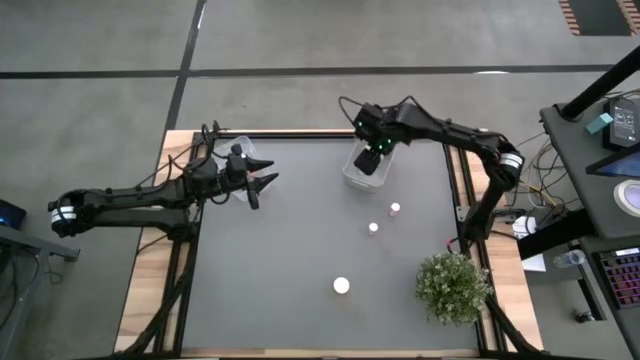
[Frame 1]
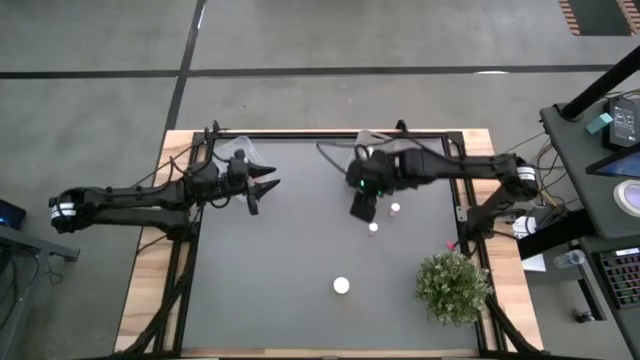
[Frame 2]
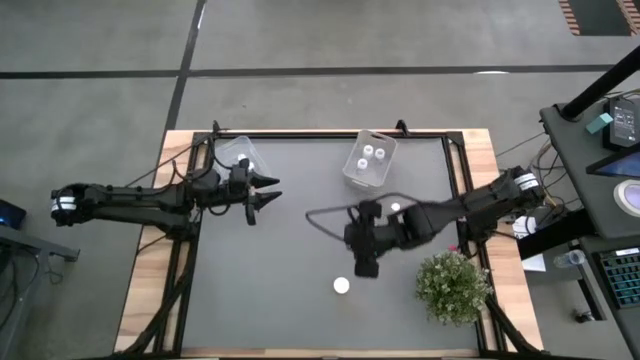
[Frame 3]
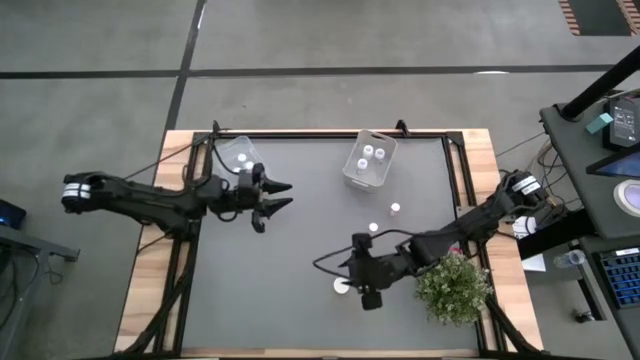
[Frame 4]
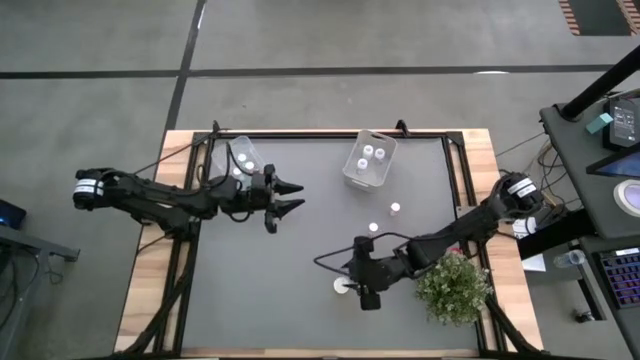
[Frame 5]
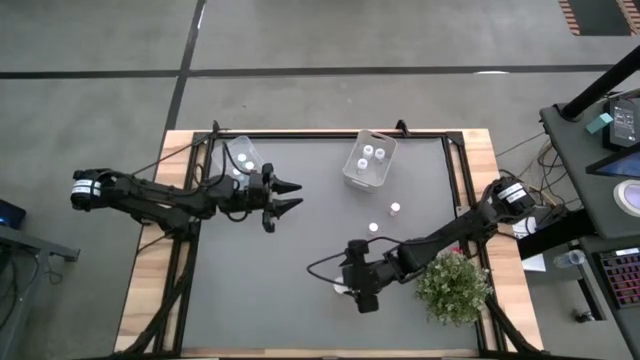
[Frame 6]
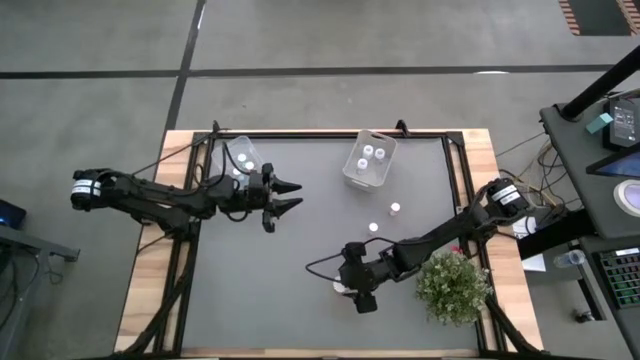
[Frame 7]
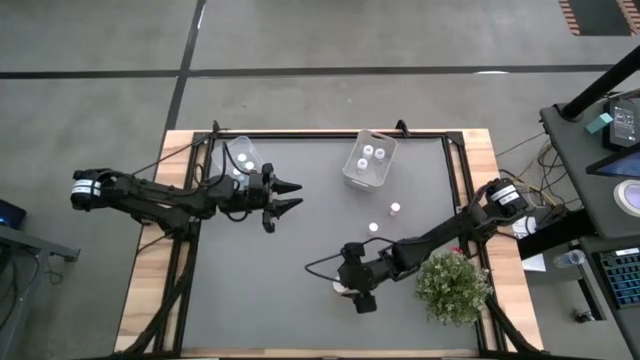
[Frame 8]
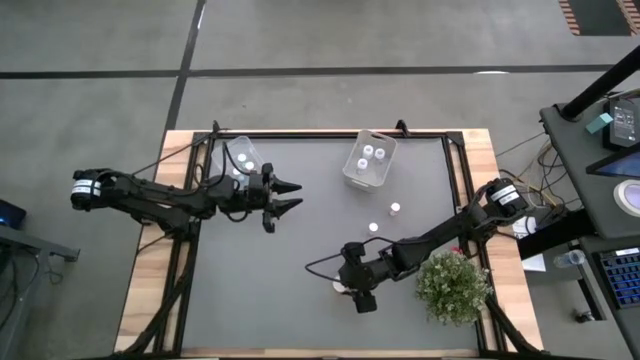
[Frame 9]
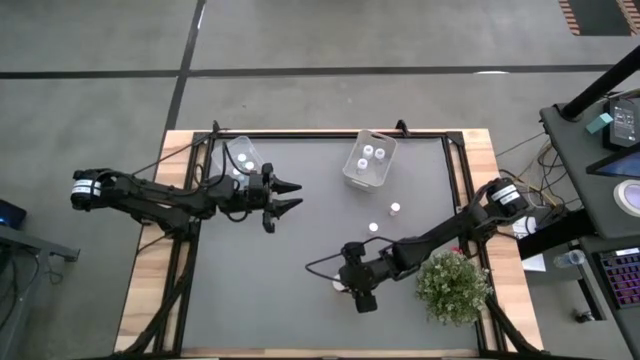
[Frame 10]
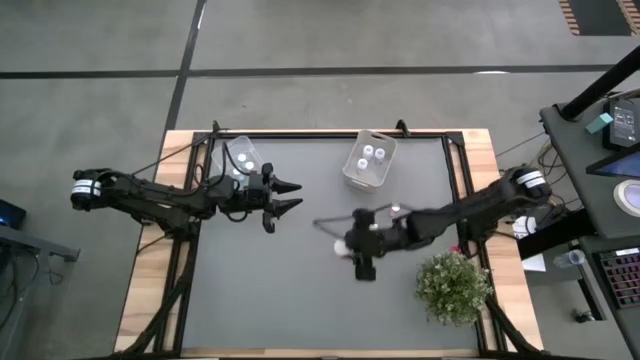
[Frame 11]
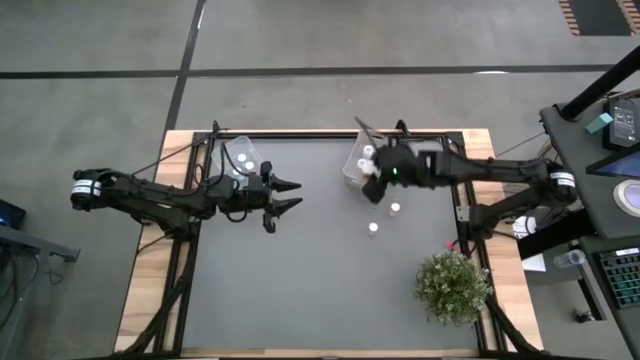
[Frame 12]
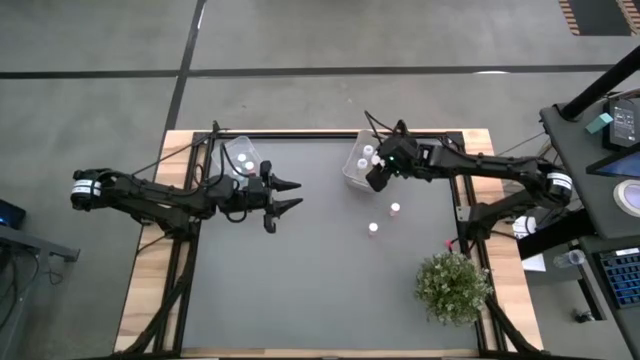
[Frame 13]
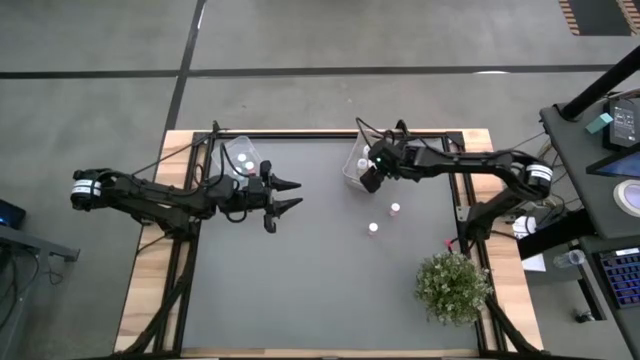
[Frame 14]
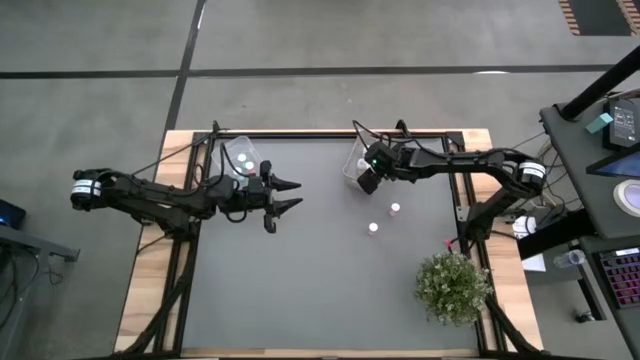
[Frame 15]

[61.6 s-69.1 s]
Task: Pick and place medicine bottles into bin by pill shape (circle, oval)
Put the large orange pill bottle into the gray bin

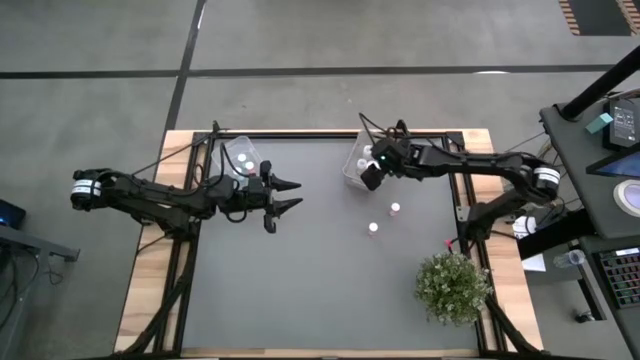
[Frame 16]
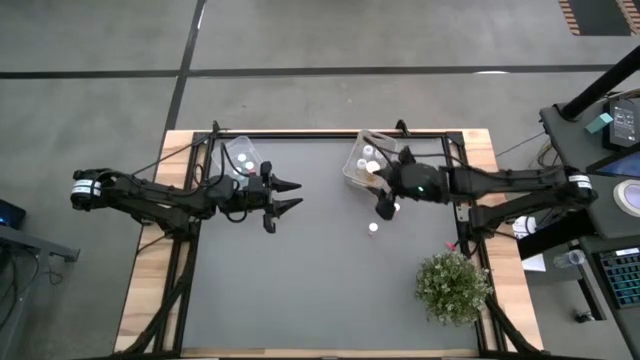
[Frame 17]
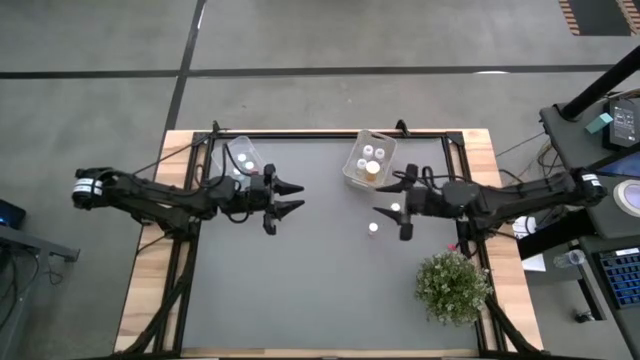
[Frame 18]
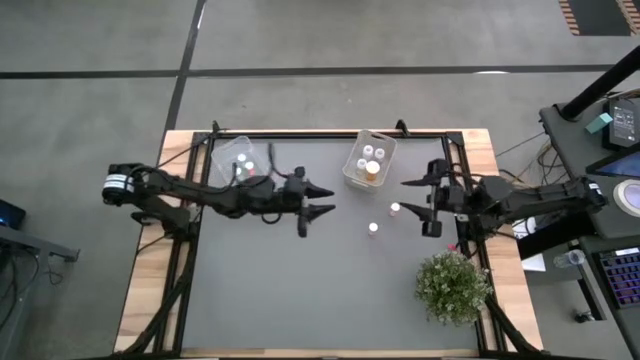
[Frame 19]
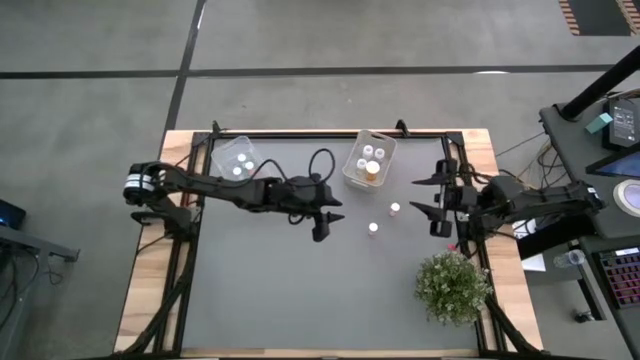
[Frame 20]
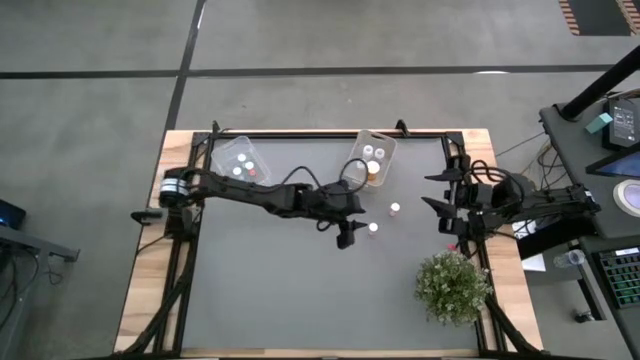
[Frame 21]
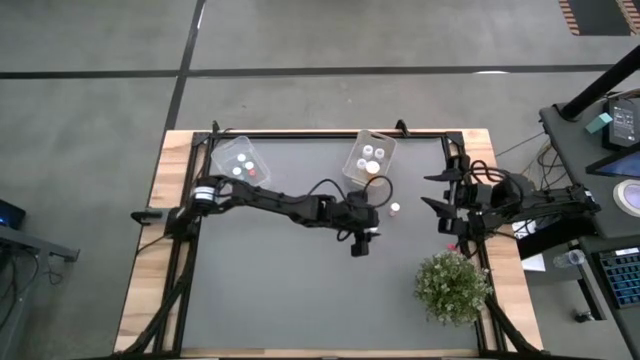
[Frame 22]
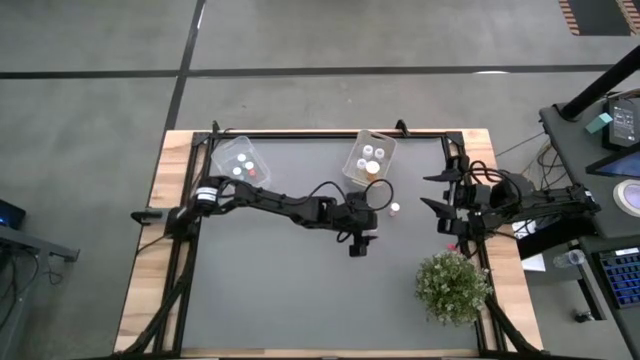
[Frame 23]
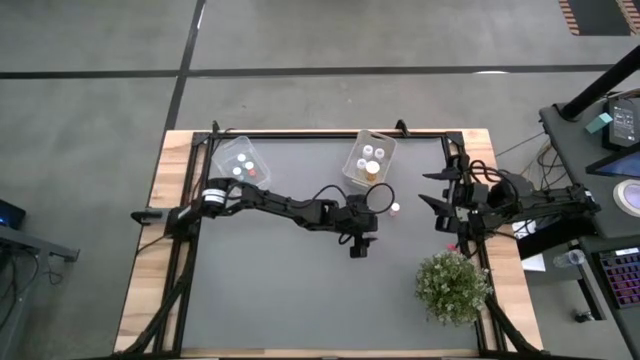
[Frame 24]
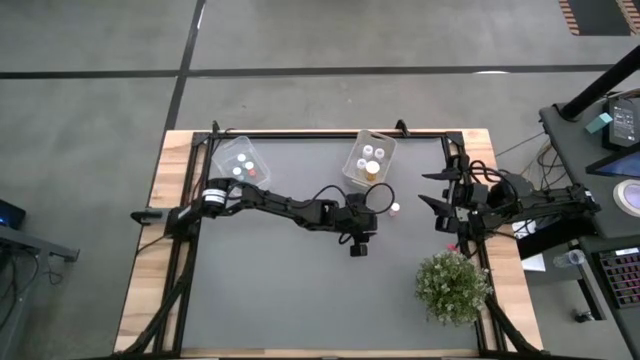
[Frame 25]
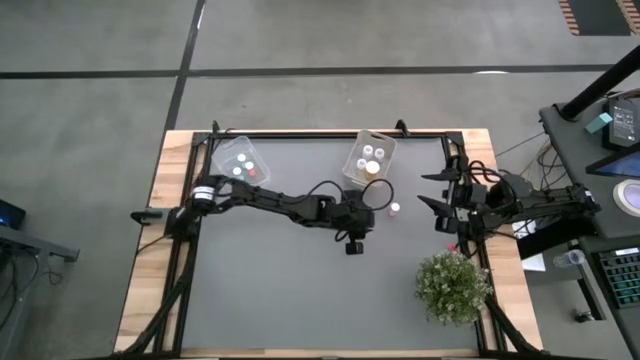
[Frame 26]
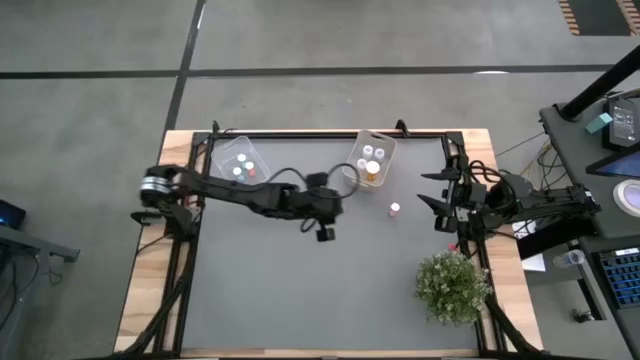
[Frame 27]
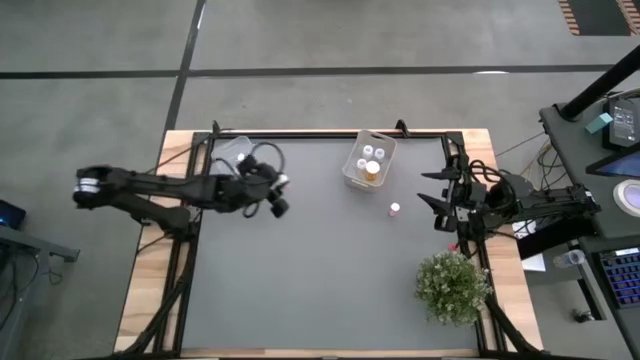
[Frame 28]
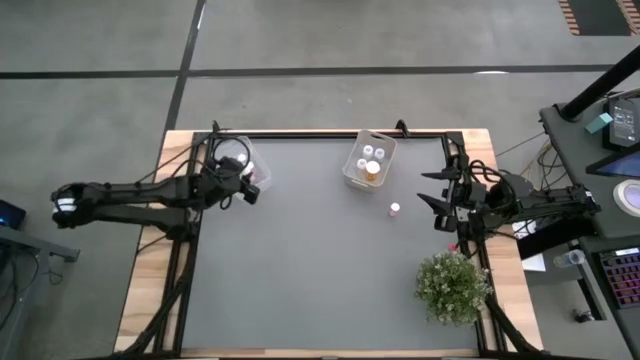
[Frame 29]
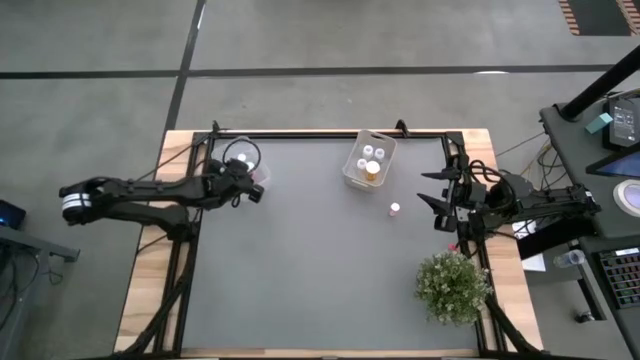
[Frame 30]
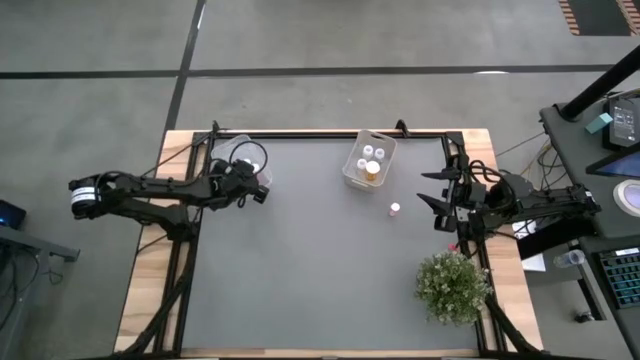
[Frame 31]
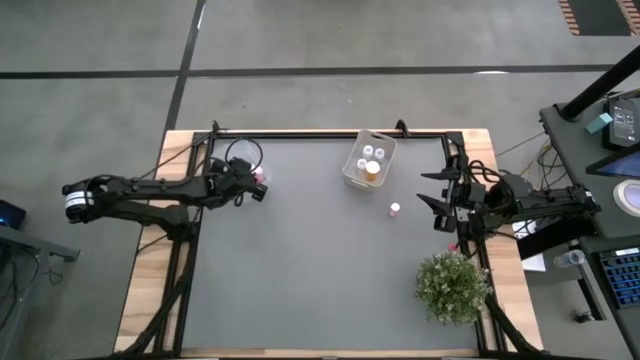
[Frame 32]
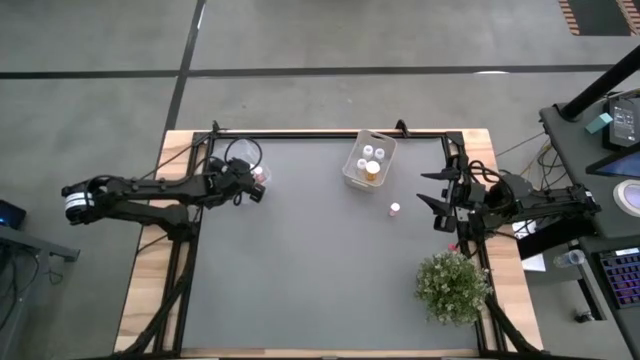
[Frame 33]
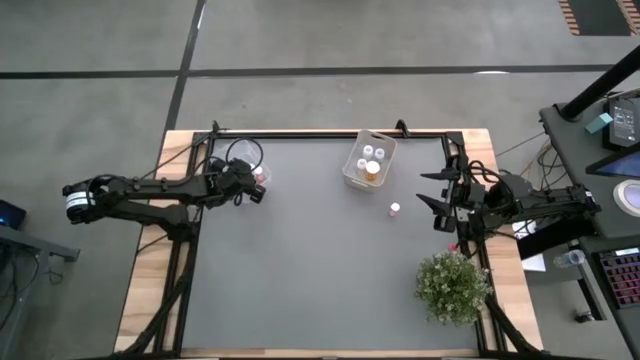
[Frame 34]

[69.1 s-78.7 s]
Put the bottom violet pill bottle into the transparent bin

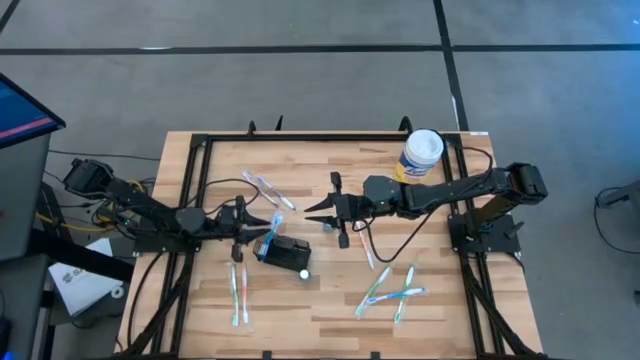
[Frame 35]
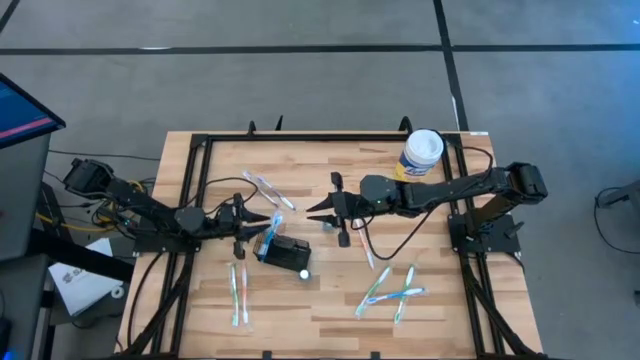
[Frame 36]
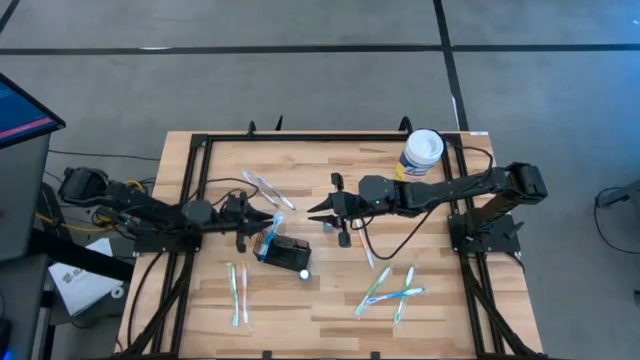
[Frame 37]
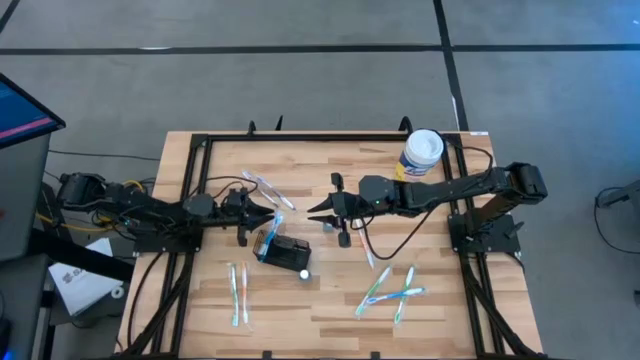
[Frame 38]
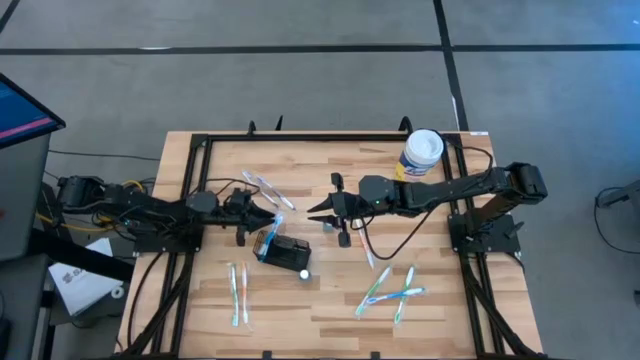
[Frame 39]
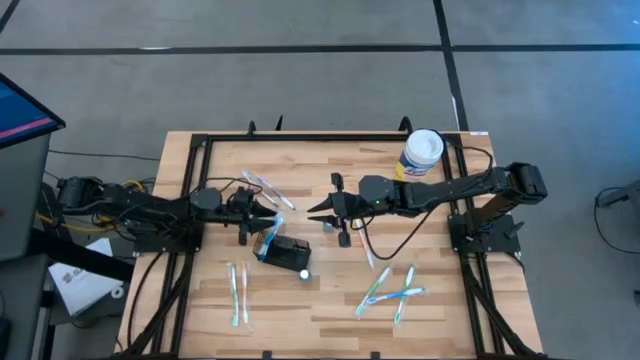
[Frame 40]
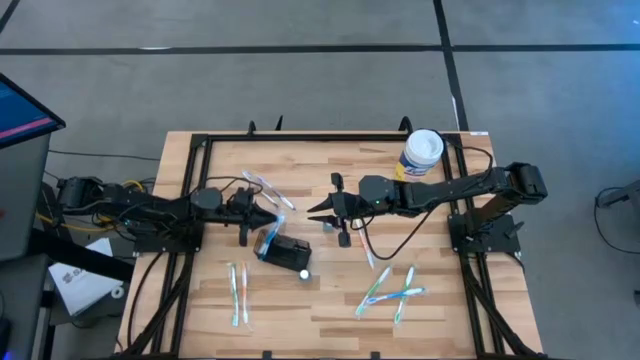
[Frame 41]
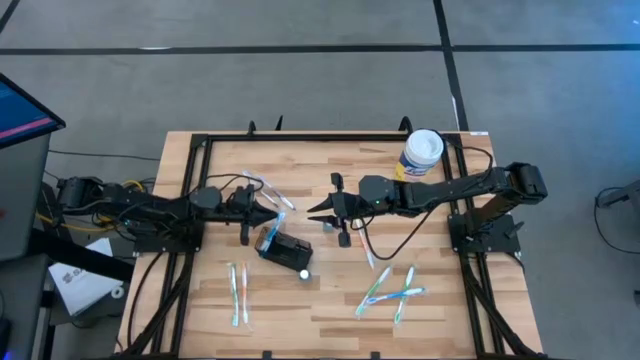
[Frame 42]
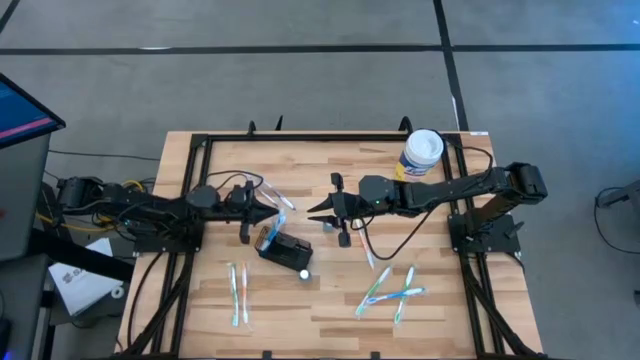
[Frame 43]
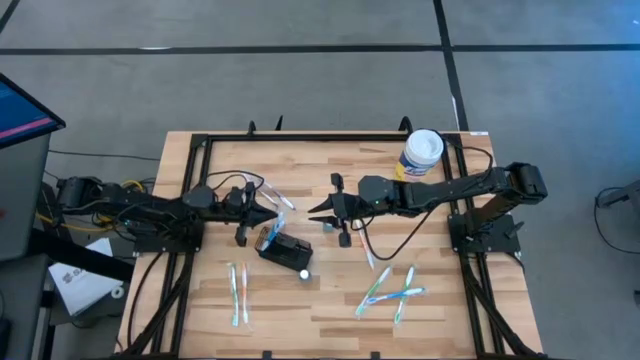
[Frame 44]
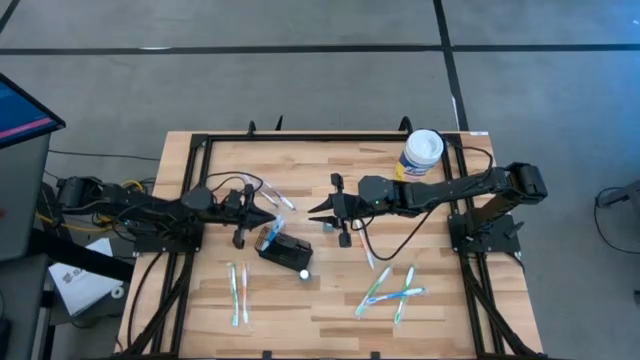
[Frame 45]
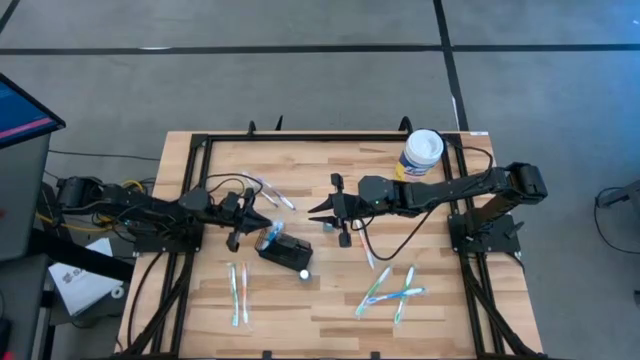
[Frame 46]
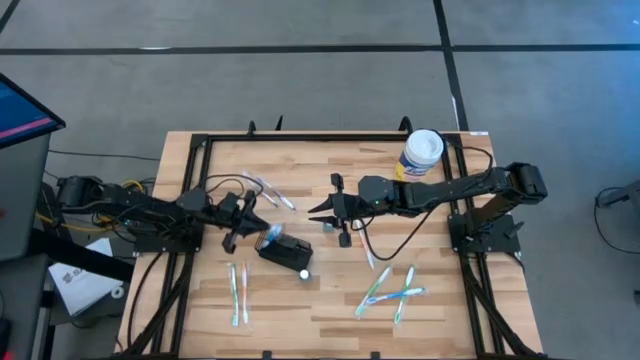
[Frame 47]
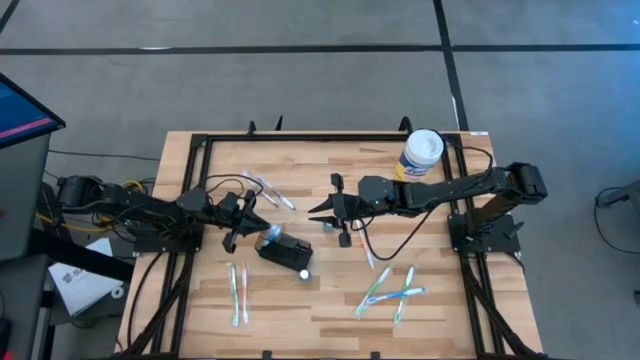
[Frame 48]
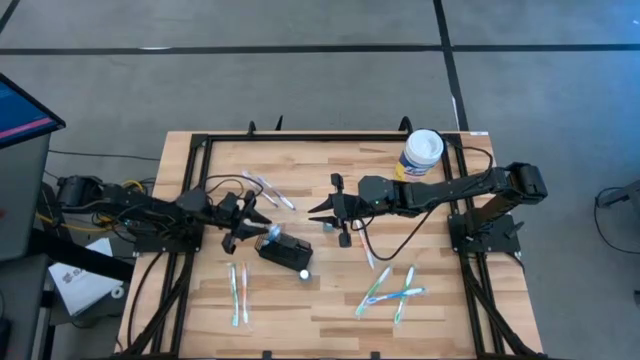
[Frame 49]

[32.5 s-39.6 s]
Task: Pick & Place toothbrushing station
Adjust the blue toothbrush in the left compartment of the wire organizer
